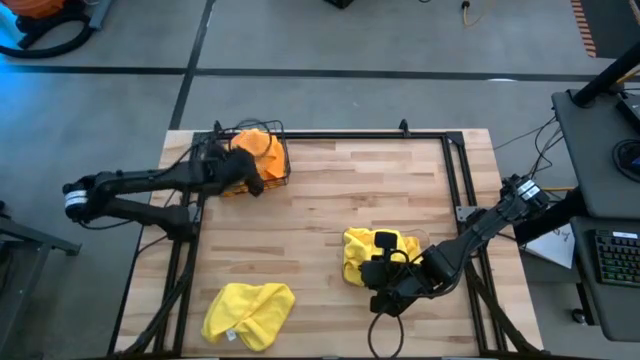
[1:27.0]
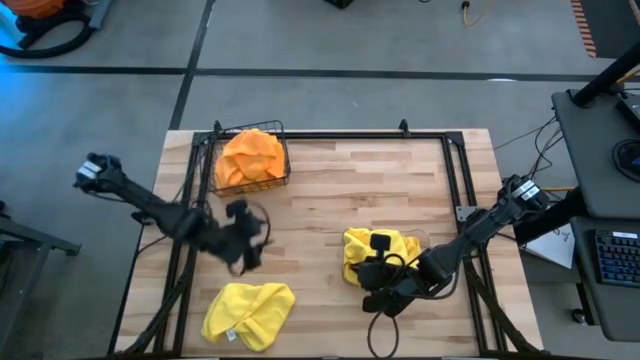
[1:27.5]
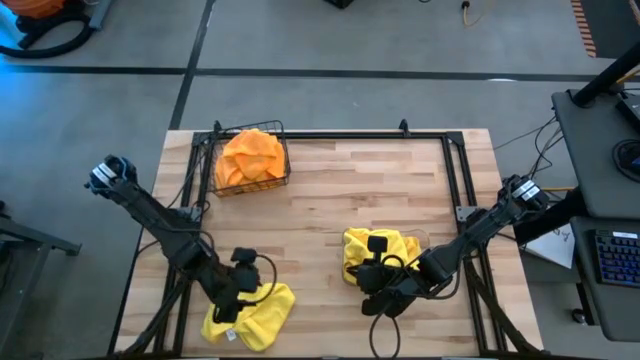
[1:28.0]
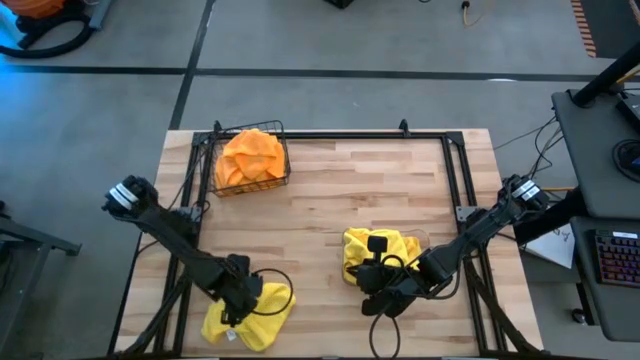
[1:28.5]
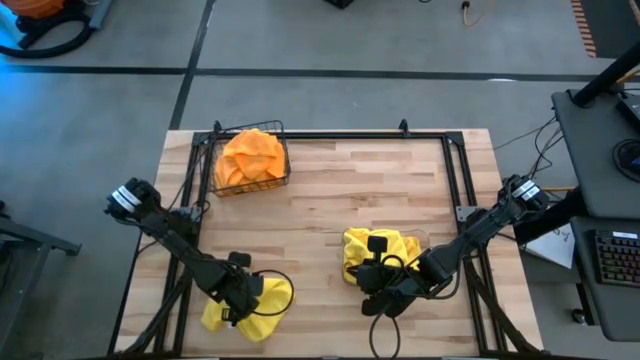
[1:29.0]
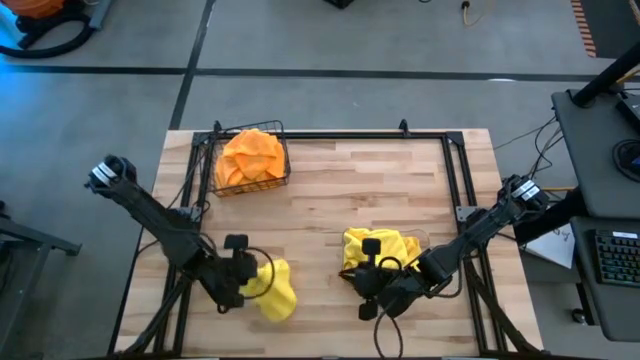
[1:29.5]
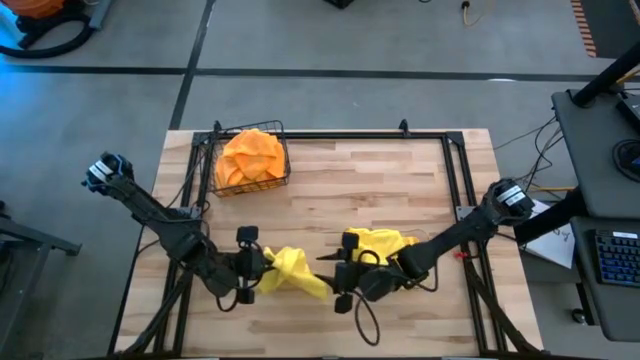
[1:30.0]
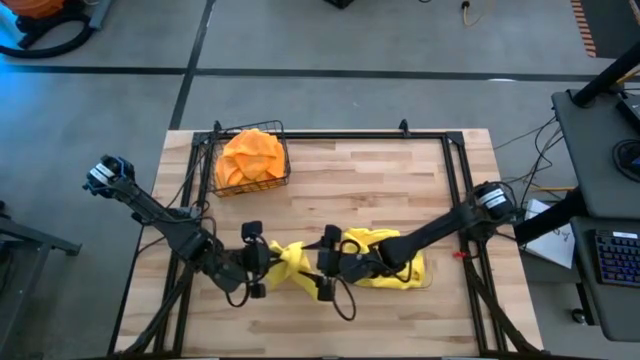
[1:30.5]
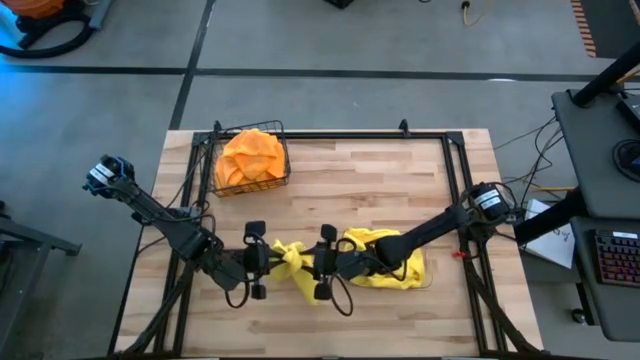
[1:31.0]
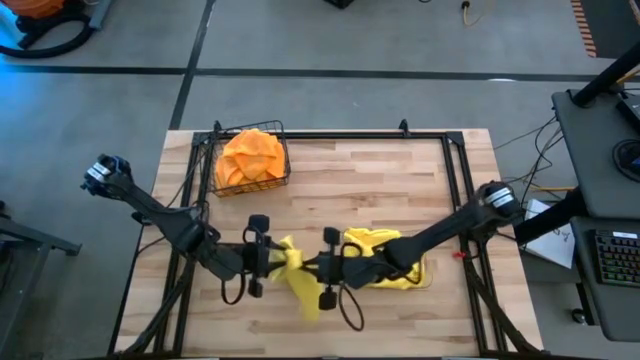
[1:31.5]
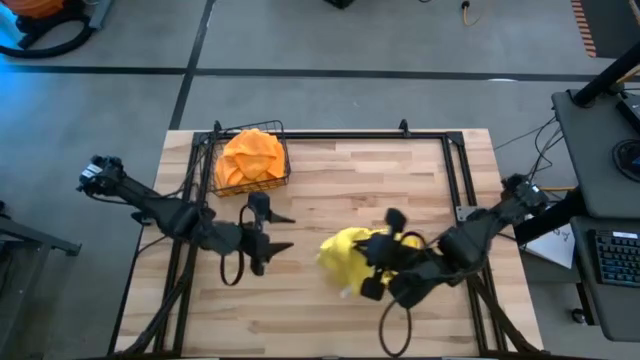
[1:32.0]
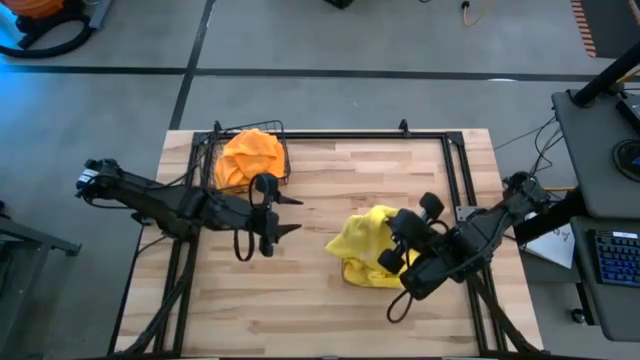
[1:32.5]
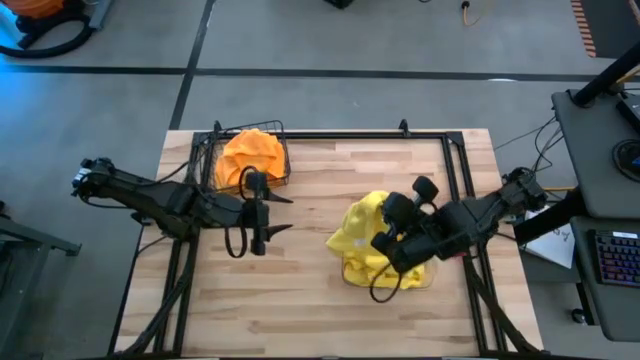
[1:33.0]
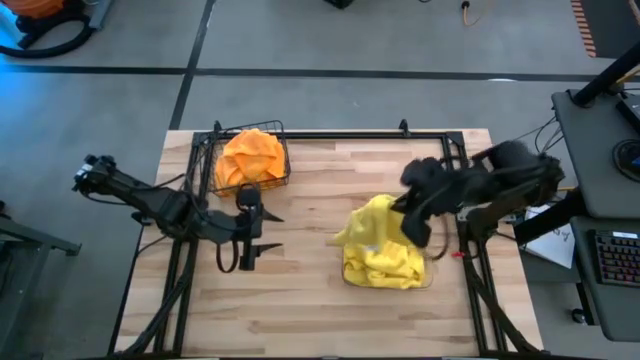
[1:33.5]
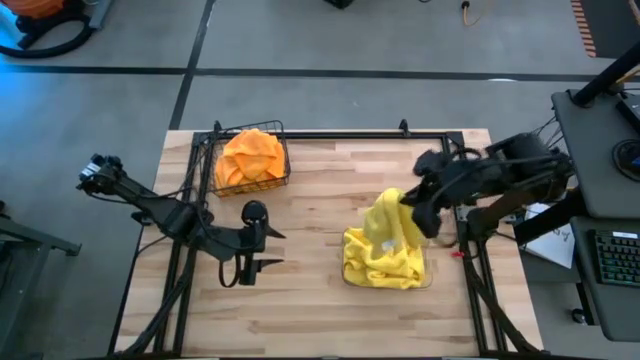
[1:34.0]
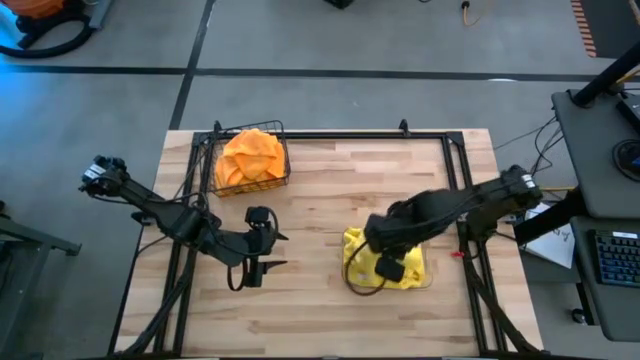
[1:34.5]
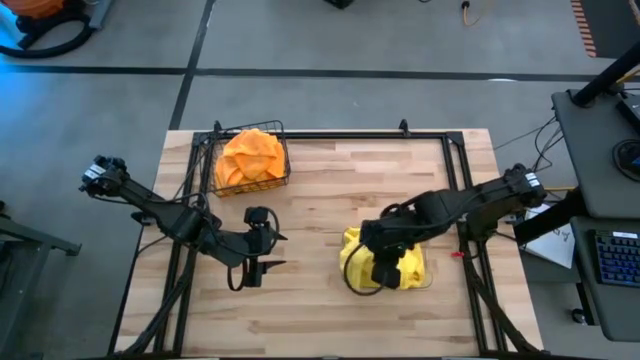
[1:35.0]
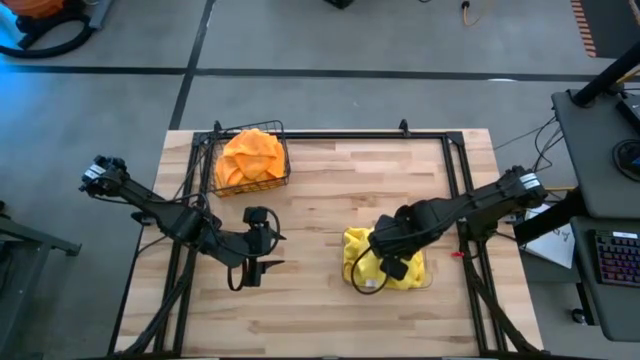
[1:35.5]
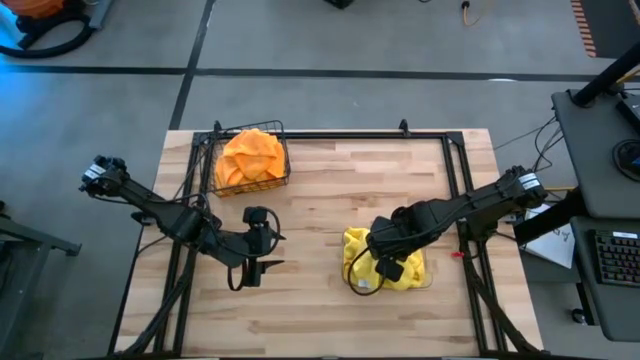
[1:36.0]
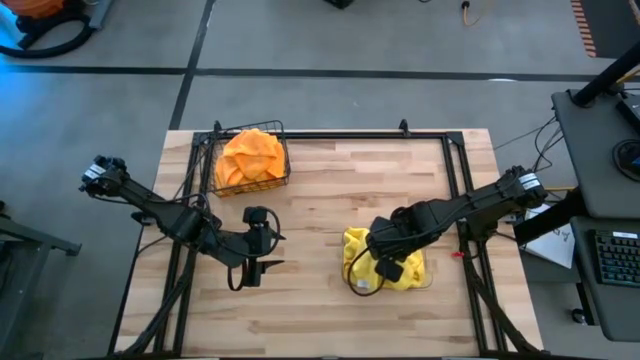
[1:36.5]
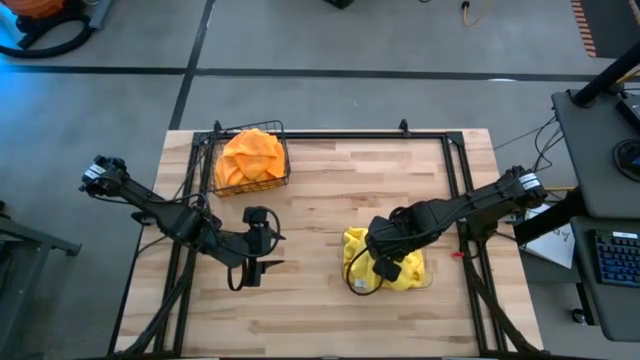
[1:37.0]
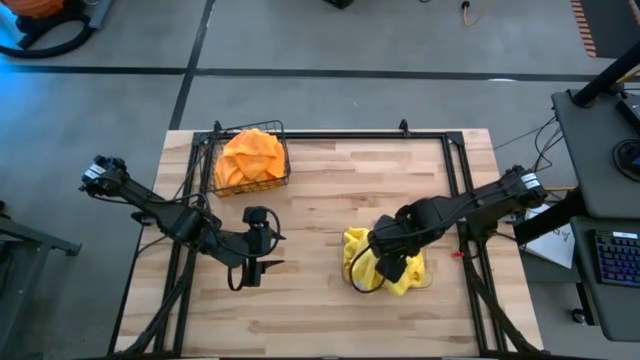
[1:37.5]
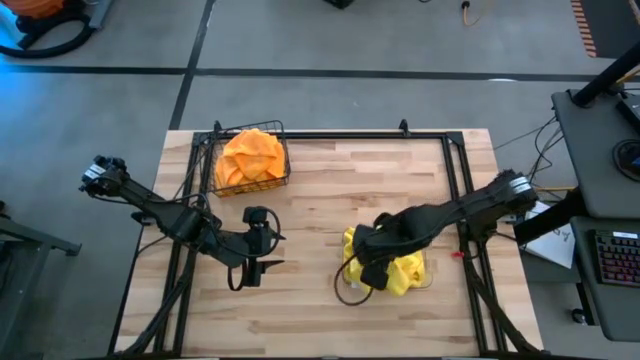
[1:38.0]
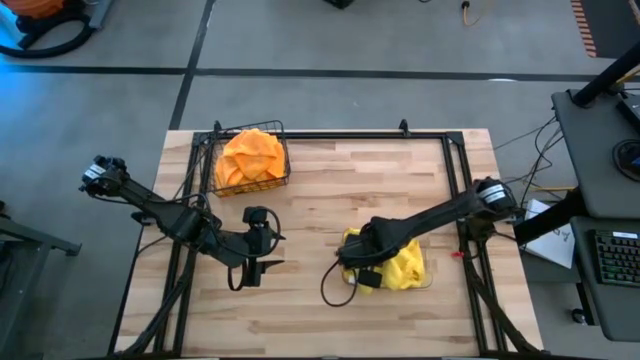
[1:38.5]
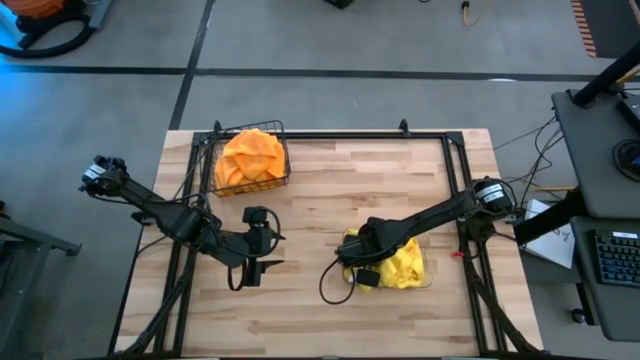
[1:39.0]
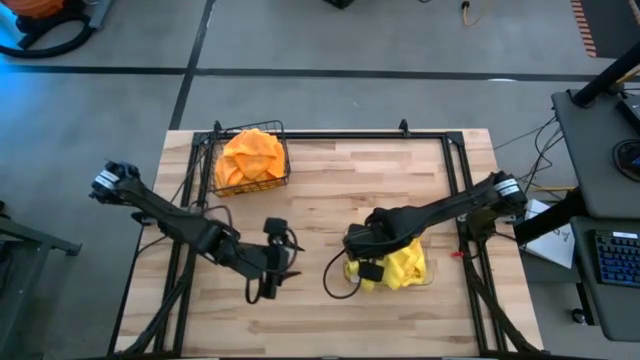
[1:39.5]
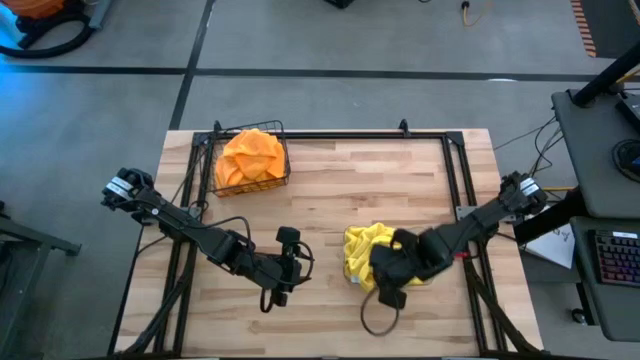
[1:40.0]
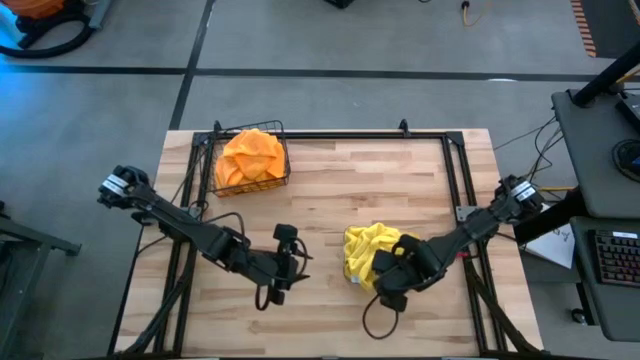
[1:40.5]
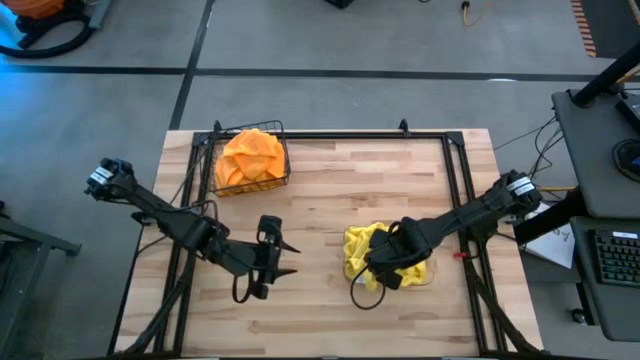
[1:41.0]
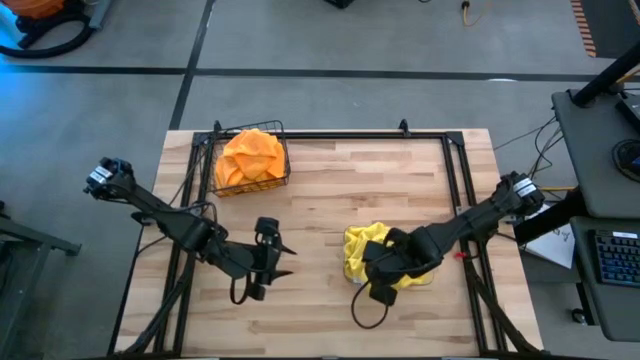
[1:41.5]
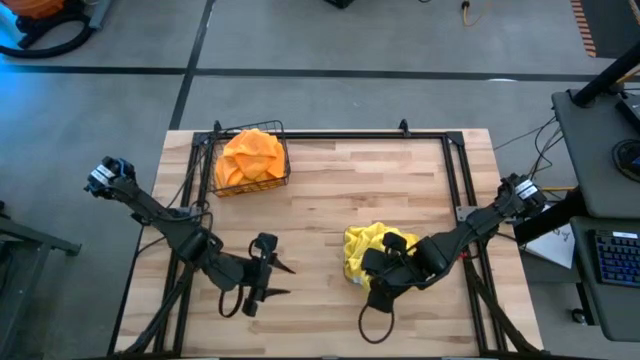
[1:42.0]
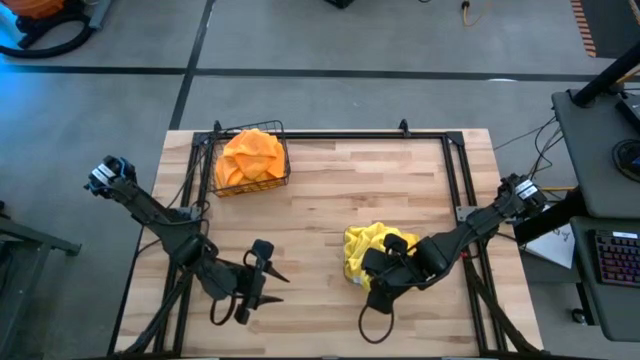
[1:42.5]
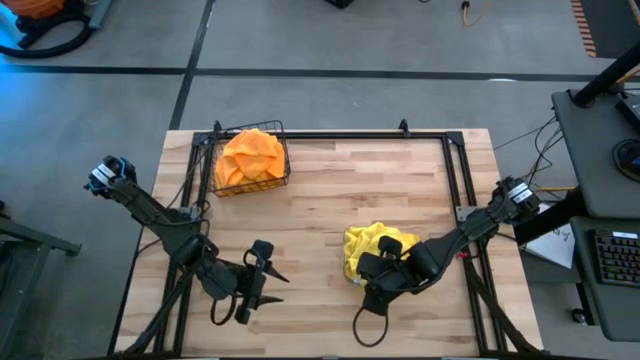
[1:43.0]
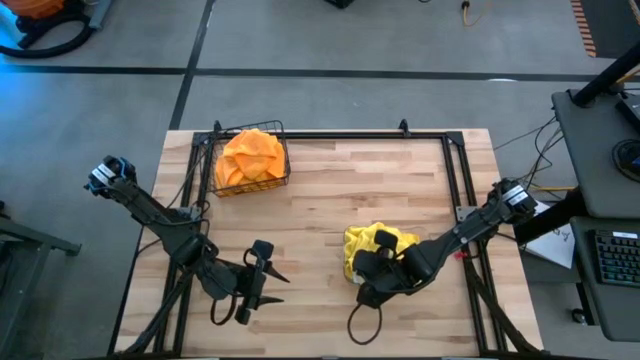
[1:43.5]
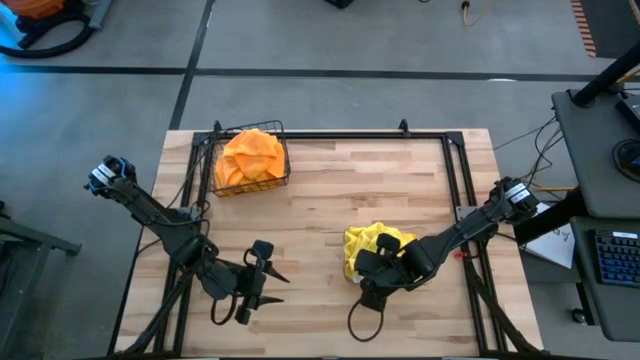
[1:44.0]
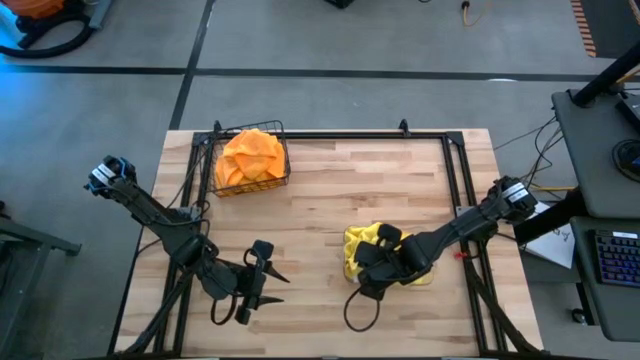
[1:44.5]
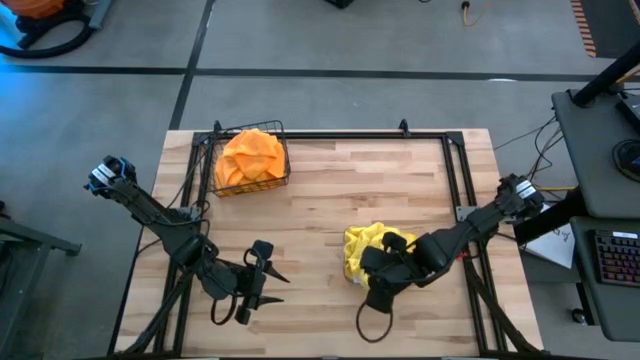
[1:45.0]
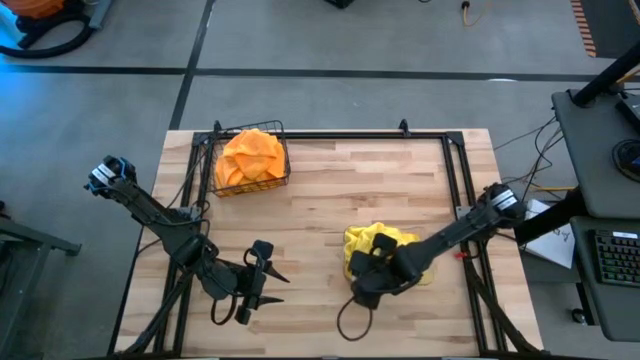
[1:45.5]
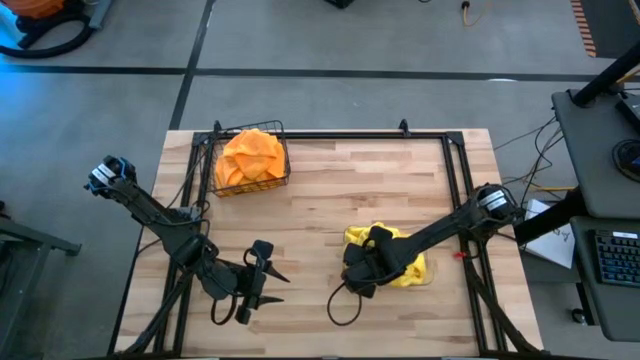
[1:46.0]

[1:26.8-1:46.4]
Task: Sort microfiber towel by color & place in baskets
Put the yellow towel into the transparent bin

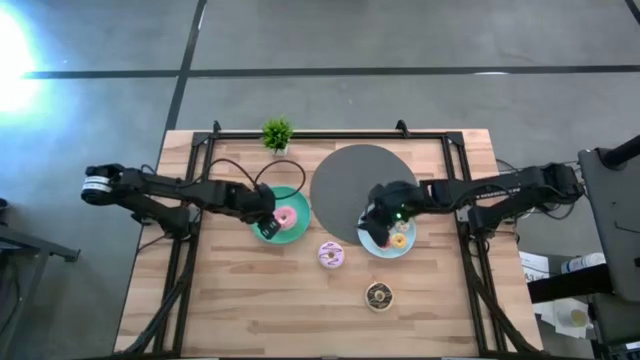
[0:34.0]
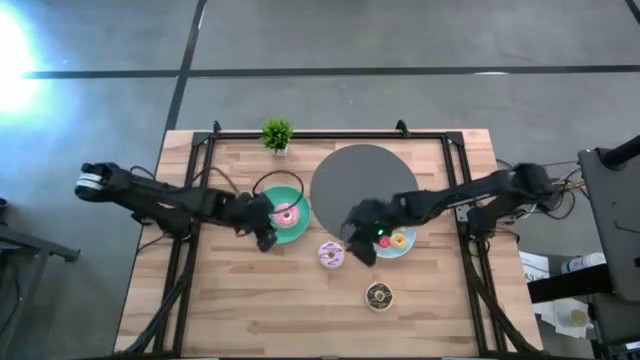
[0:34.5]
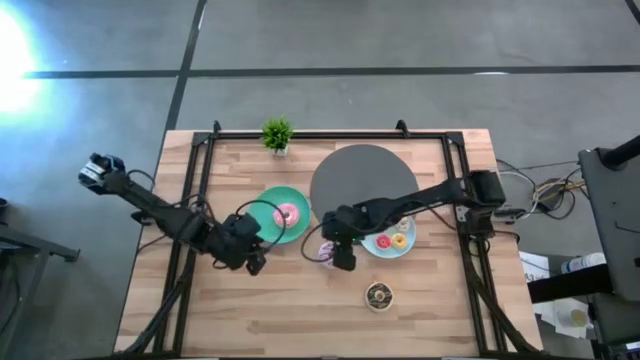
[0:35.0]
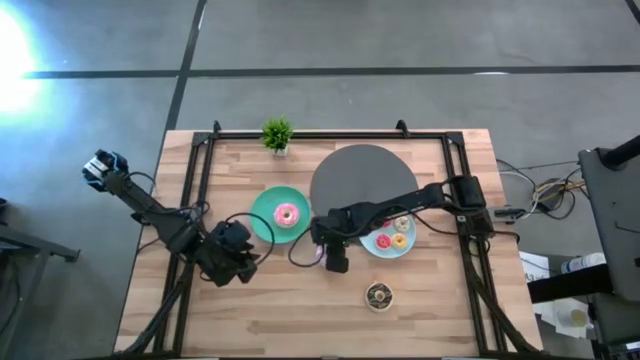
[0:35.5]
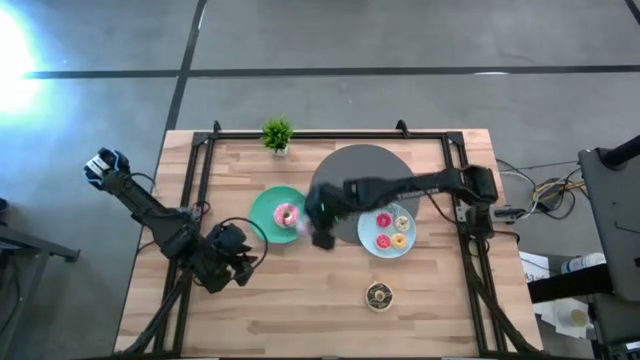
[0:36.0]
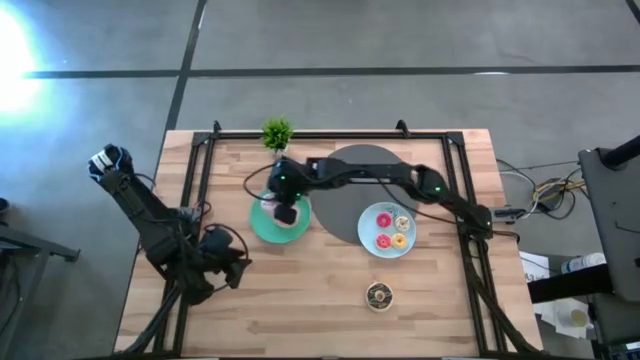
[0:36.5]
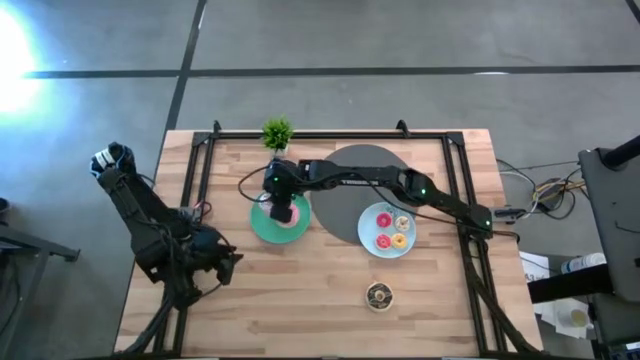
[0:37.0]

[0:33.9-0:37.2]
Task: Pick & Place donuts
Put the large purple donut on the green plate
